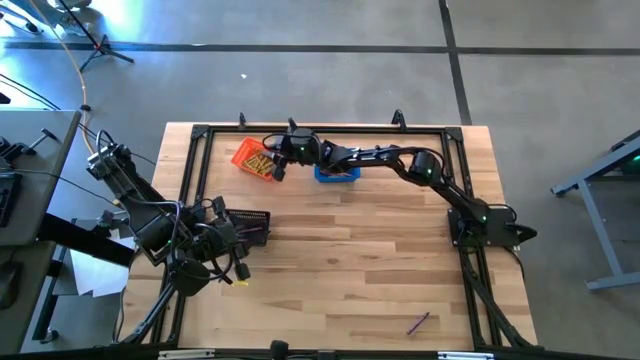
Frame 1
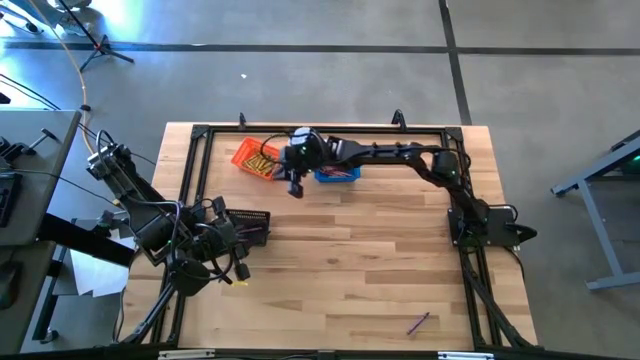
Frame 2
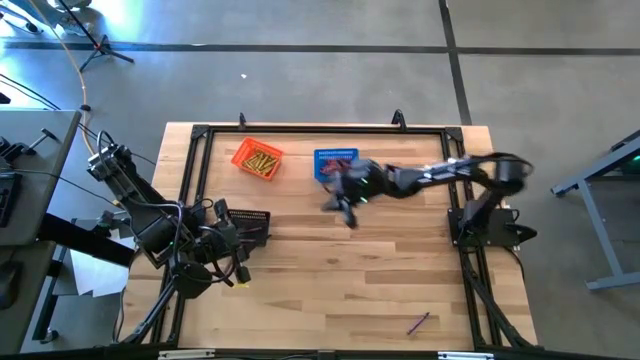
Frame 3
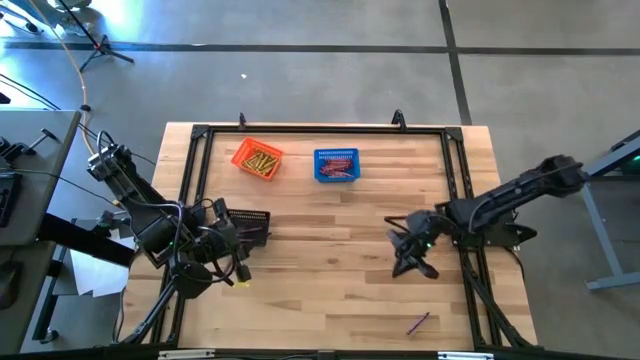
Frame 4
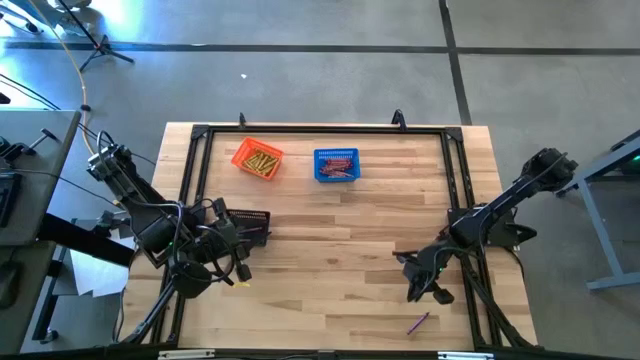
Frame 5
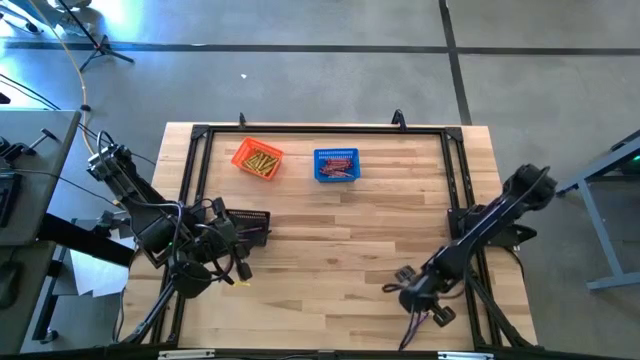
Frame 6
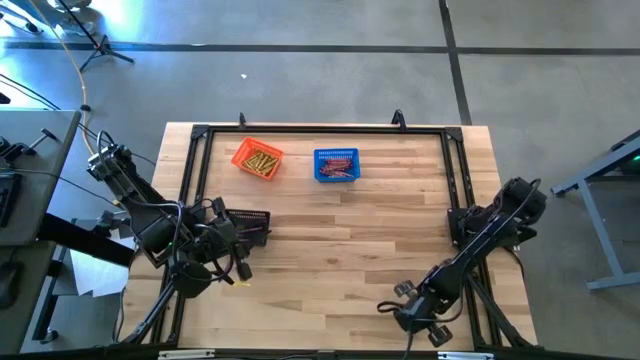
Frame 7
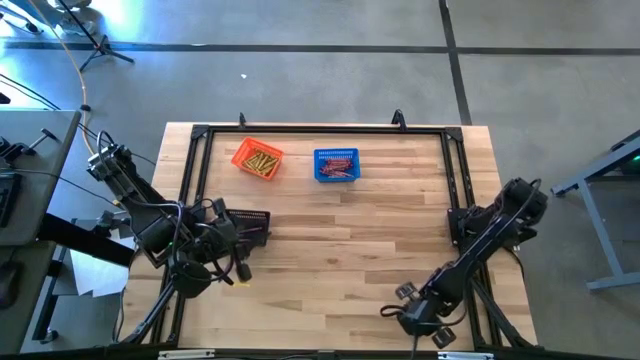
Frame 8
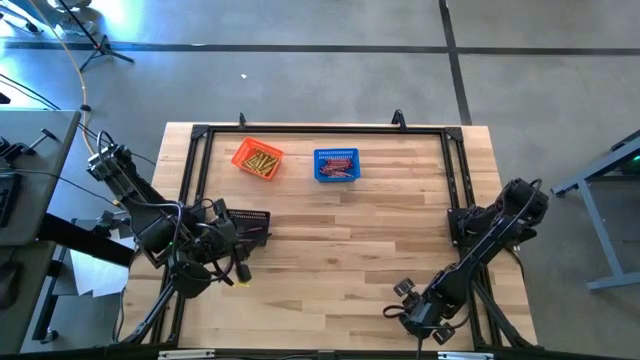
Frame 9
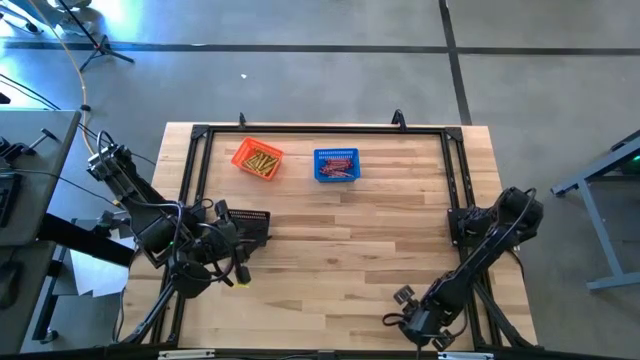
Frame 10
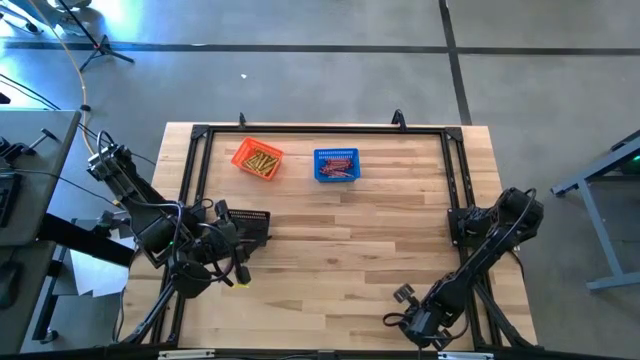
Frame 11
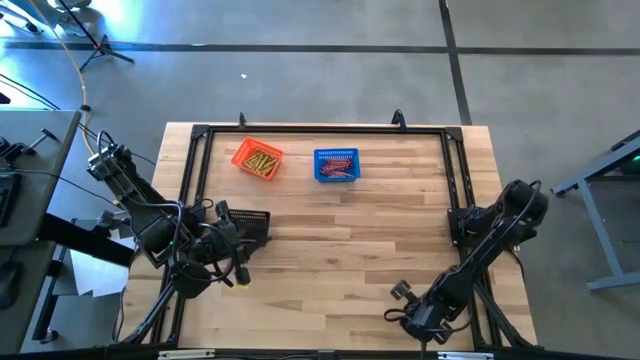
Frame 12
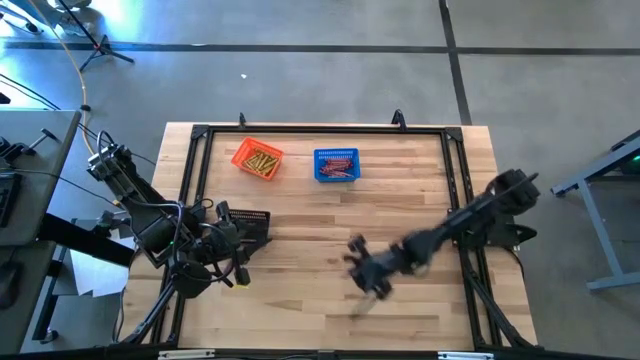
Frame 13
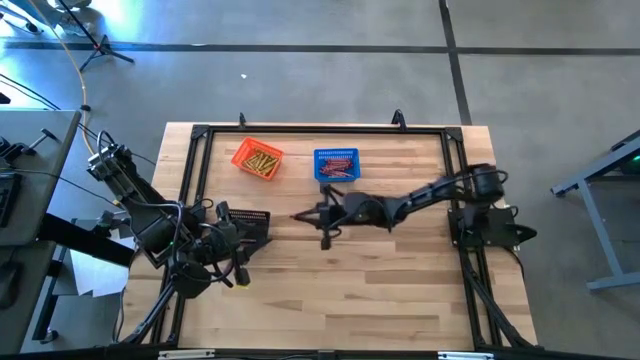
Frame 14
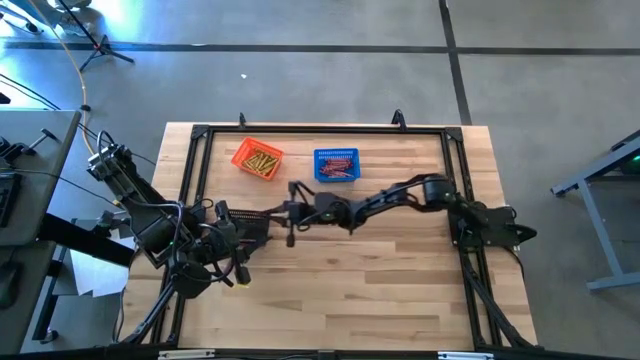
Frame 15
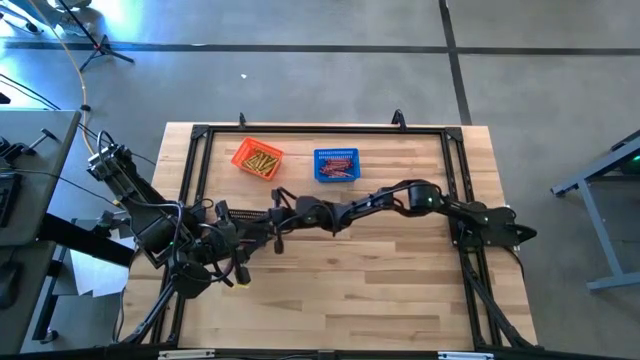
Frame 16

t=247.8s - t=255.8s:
Task: Sort crayons
Put the violet crayon into the black bin

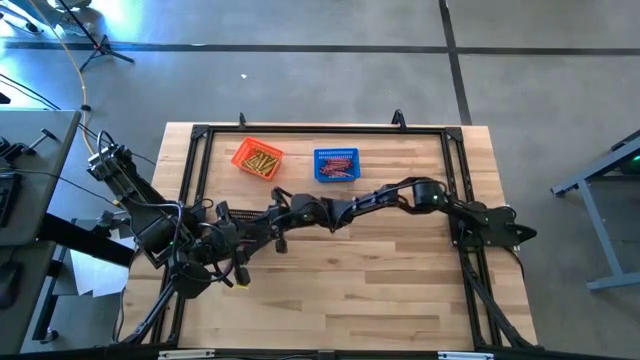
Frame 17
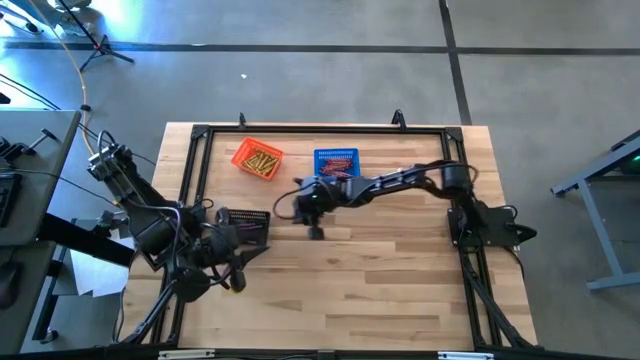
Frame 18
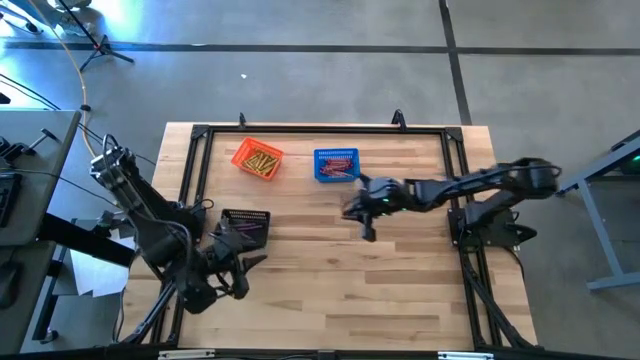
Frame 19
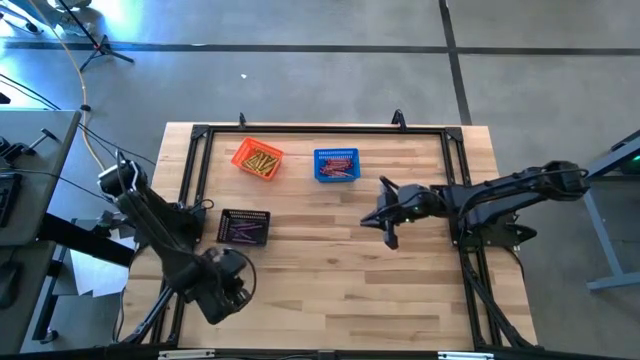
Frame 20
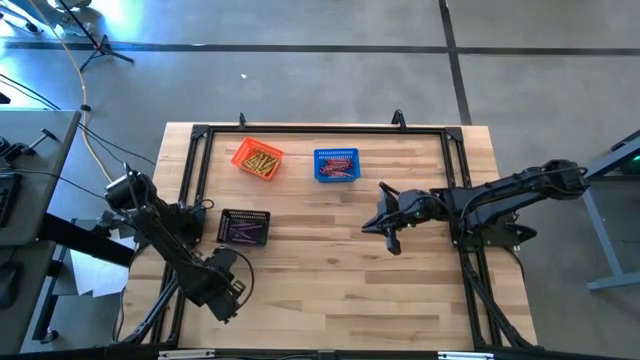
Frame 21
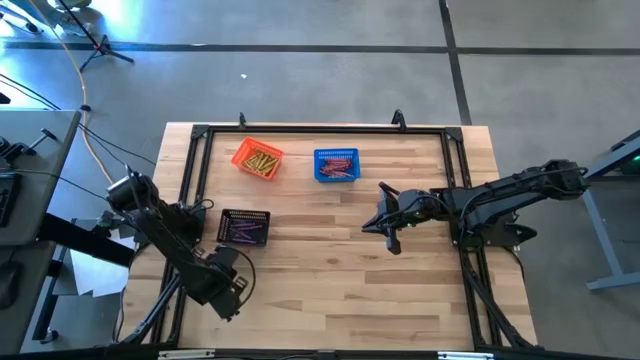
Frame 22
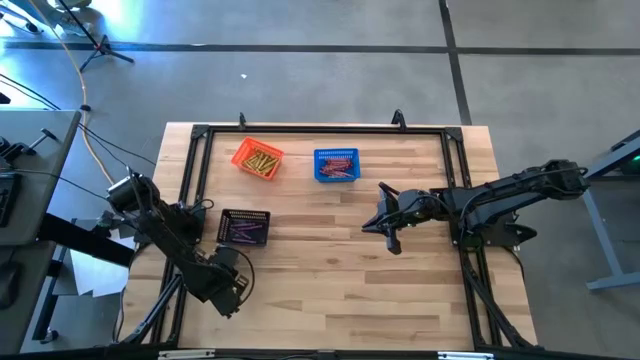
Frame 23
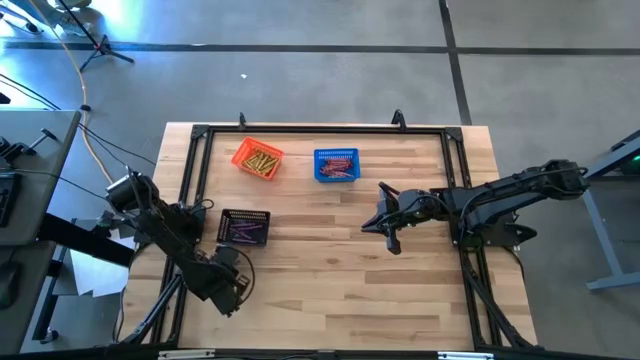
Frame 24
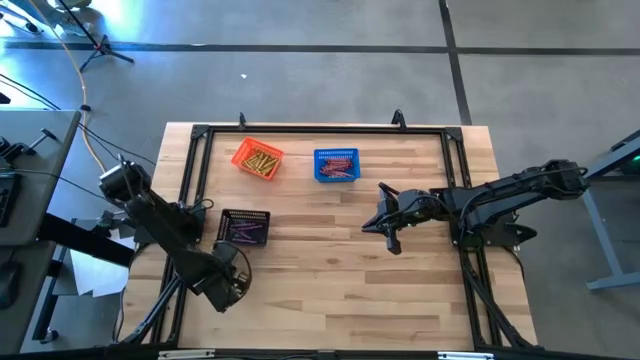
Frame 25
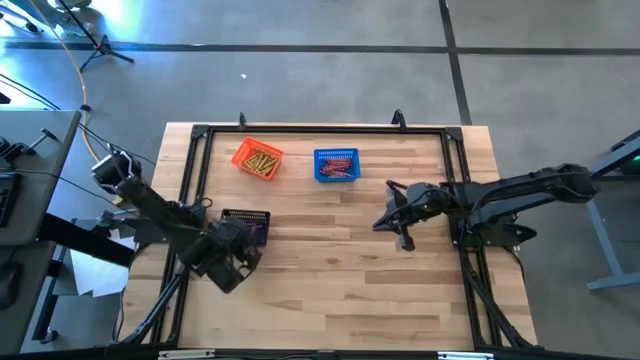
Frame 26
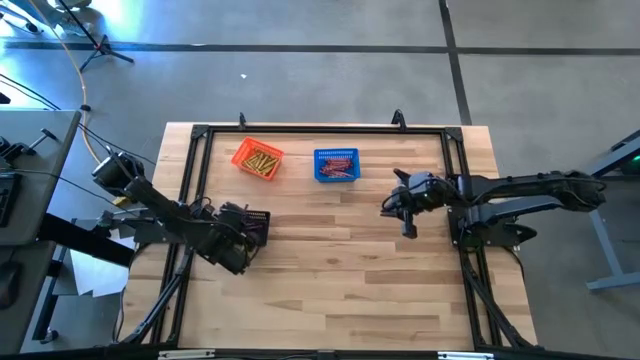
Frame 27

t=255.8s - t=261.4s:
Put the violet crayon into the black bin

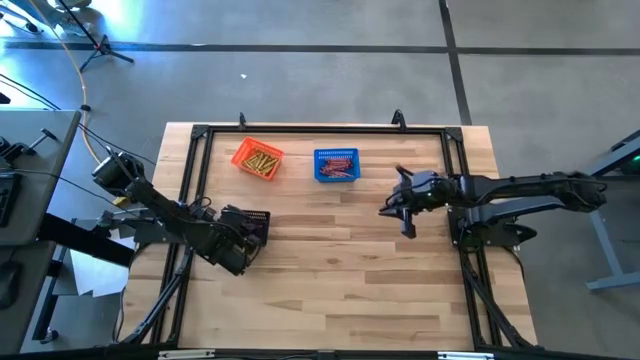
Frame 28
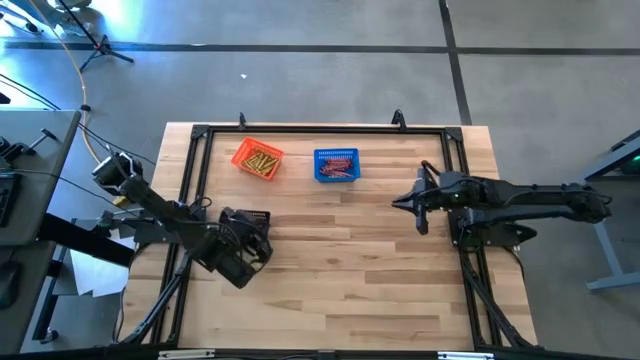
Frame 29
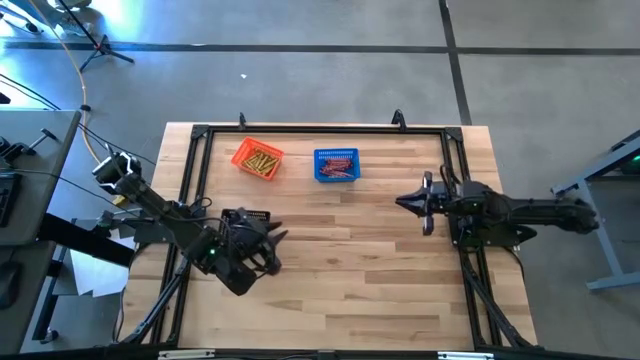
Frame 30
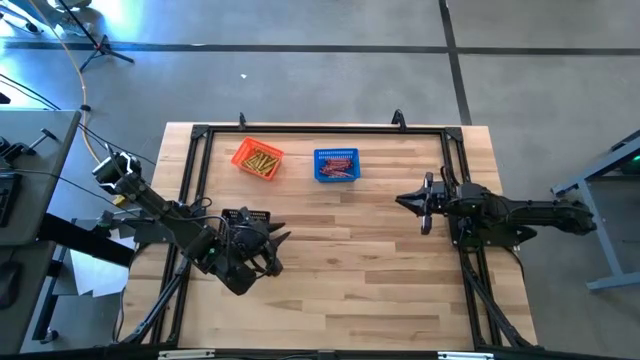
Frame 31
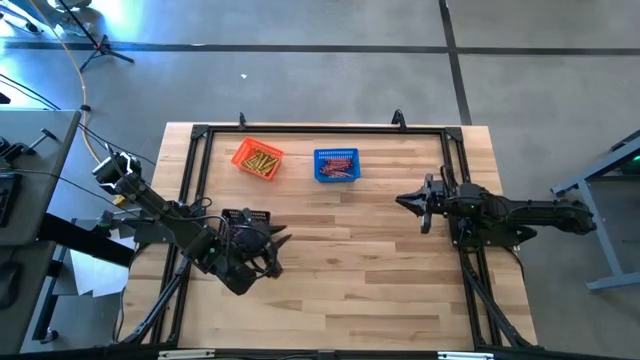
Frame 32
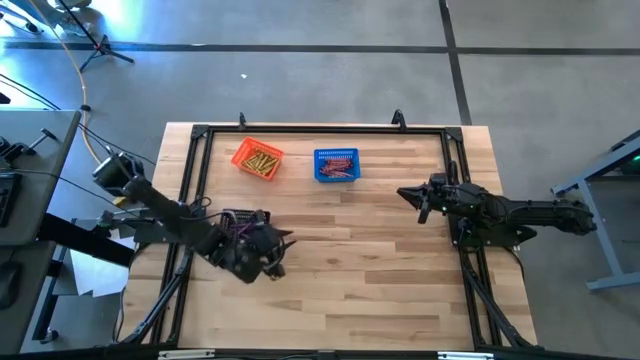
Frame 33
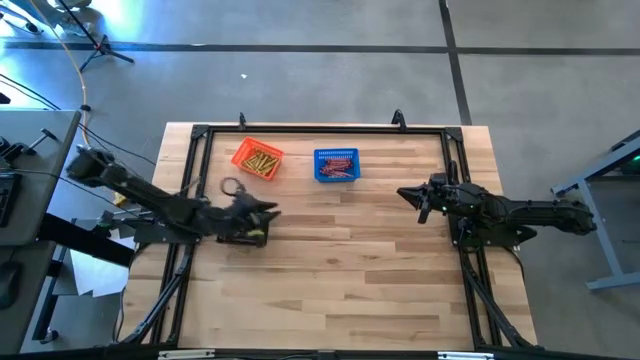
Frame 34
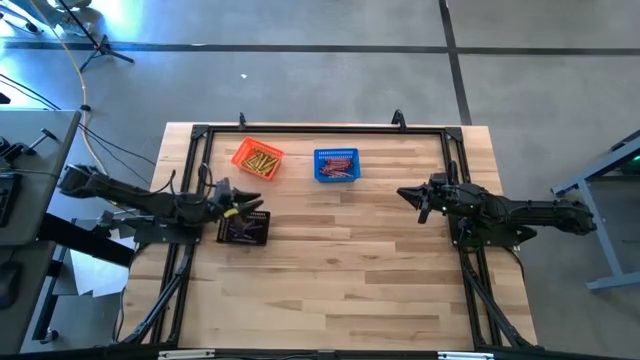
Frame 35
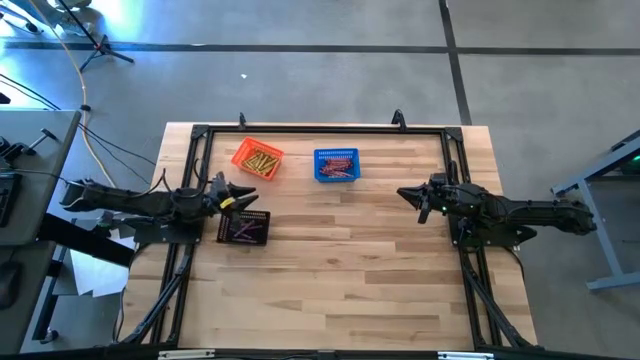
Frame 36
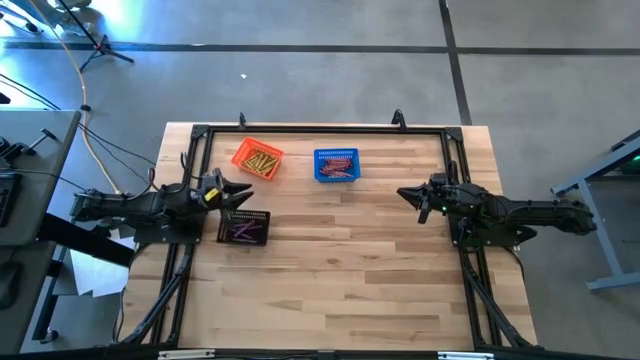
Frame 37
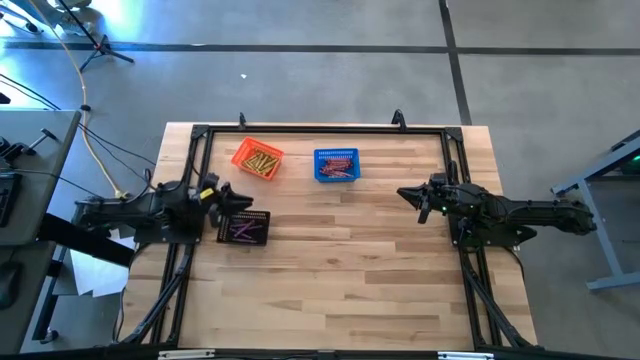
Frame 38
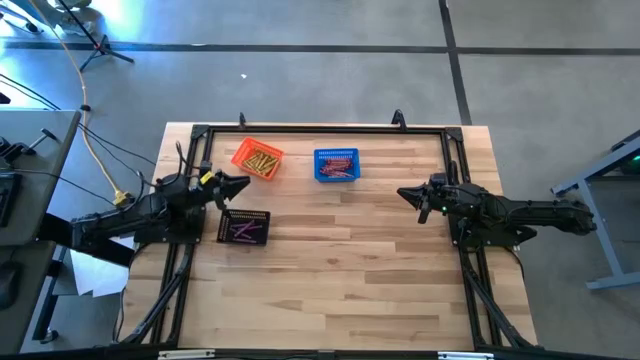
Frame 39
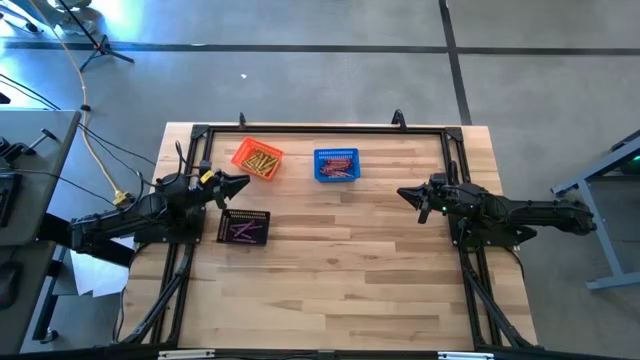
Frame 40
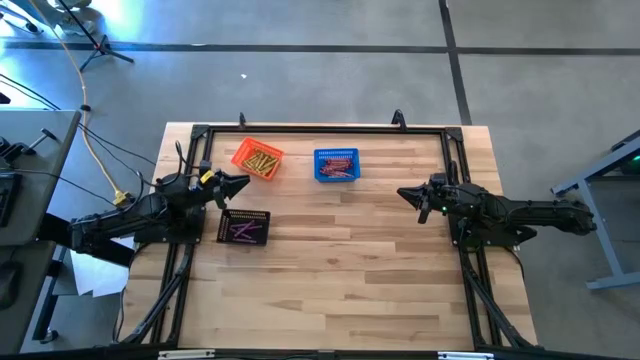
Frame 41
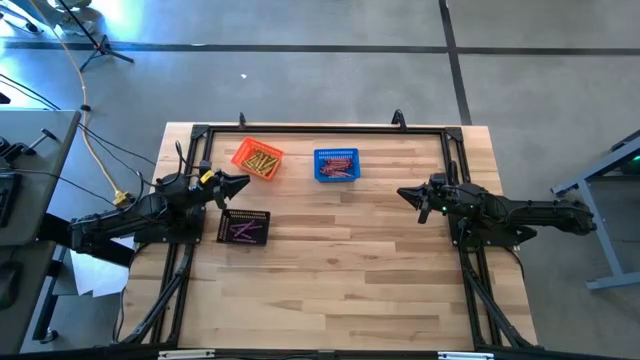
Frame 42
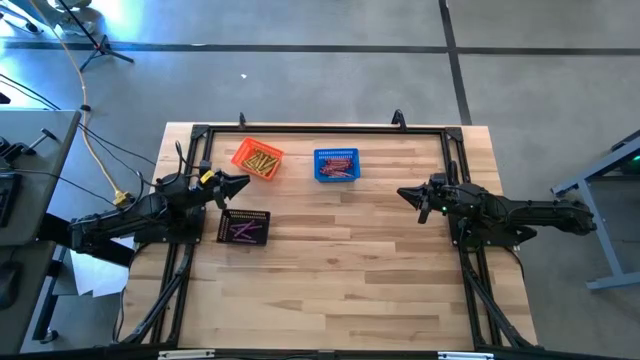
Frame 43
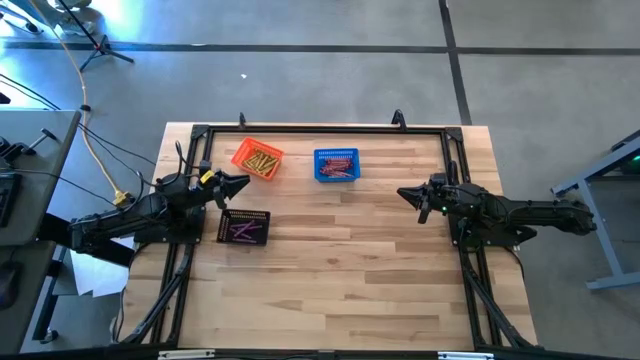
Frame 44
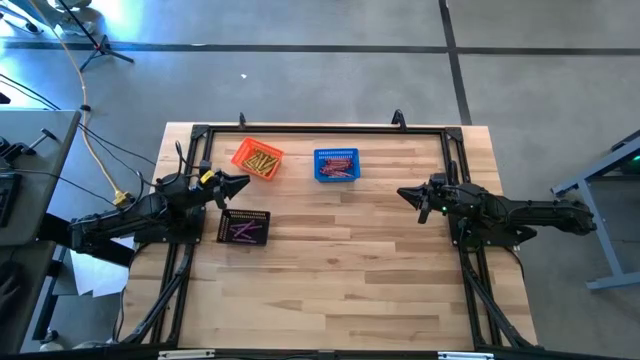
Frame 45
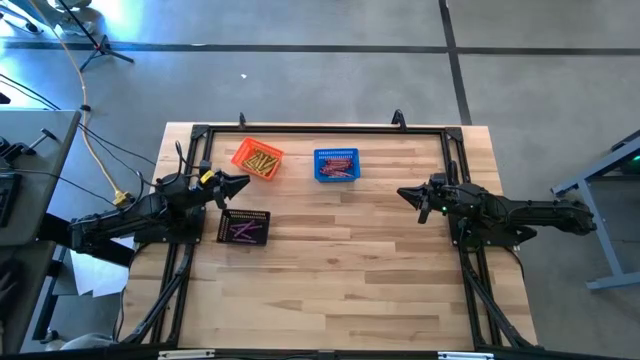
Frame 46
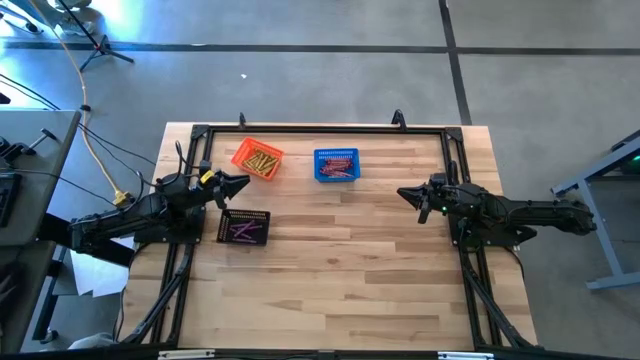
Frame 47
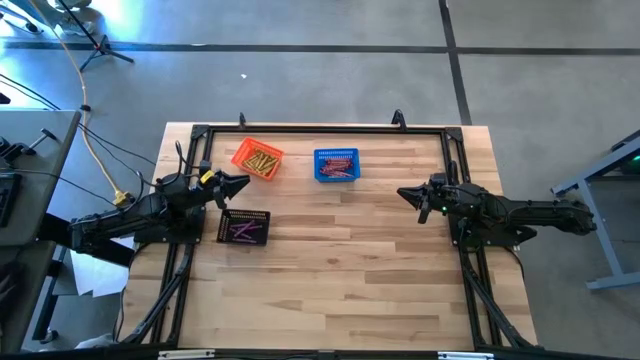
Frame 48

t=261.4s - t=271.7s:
Return to Home Position
